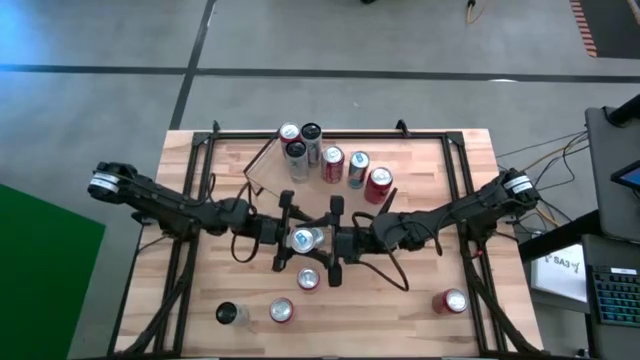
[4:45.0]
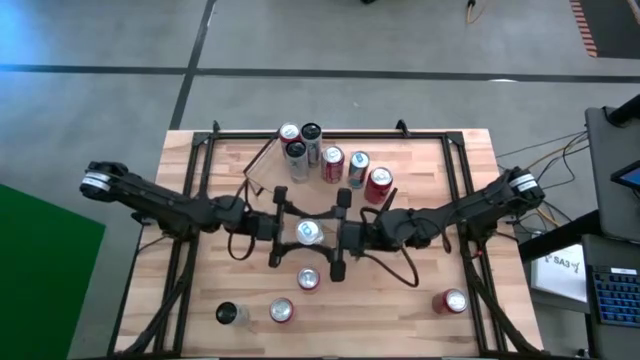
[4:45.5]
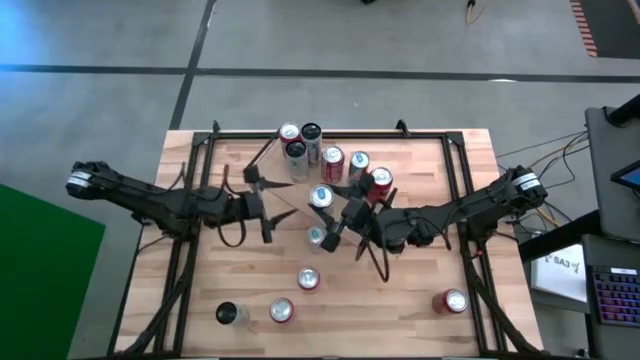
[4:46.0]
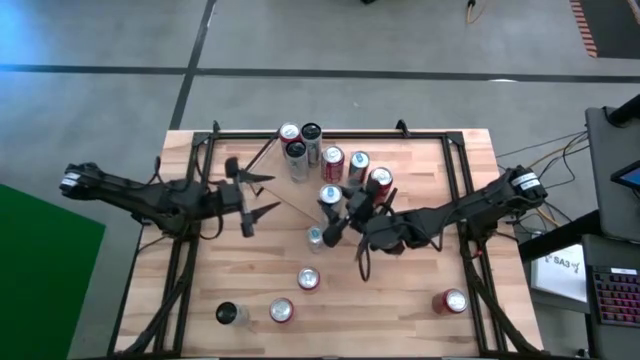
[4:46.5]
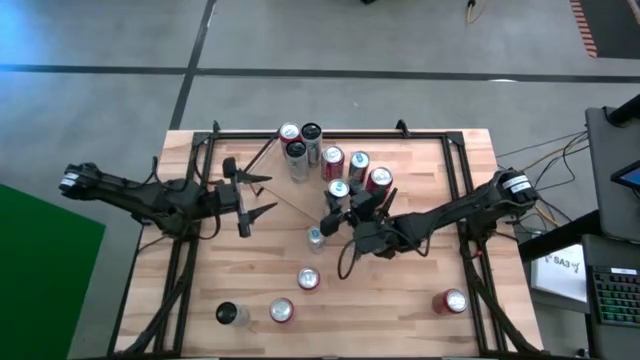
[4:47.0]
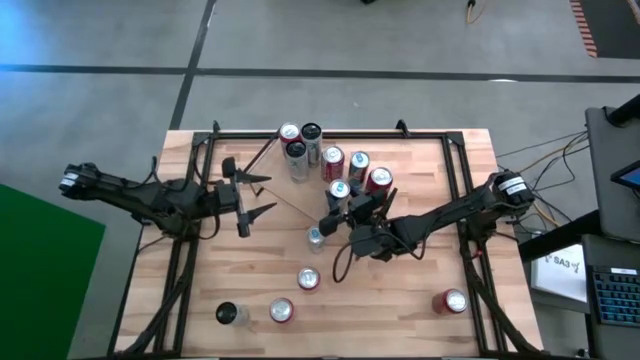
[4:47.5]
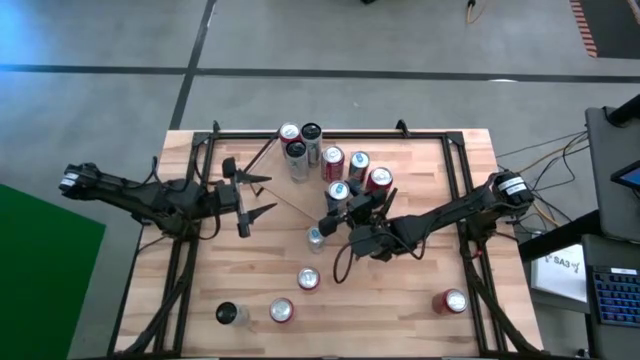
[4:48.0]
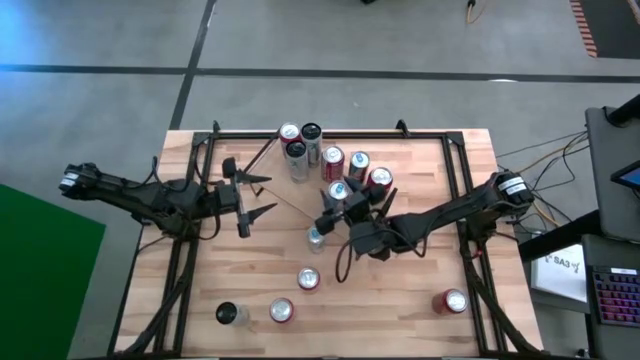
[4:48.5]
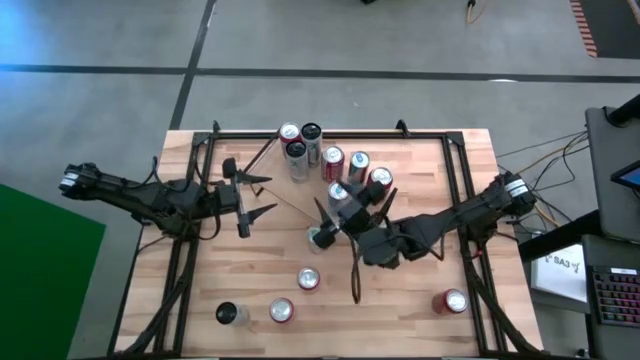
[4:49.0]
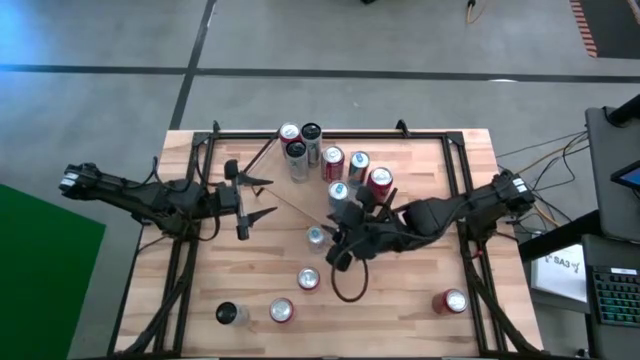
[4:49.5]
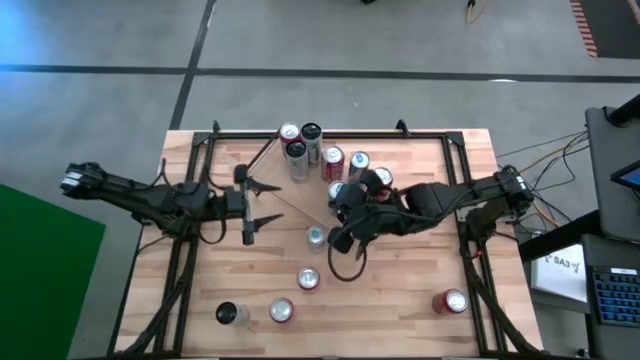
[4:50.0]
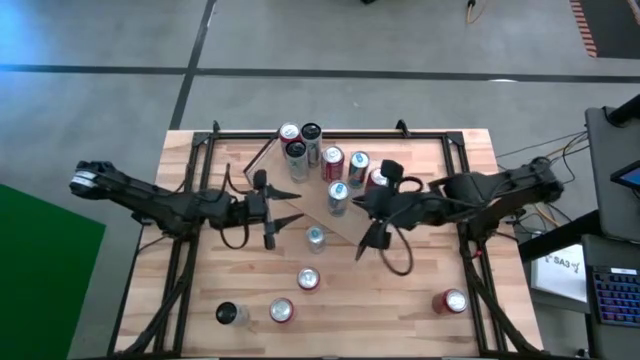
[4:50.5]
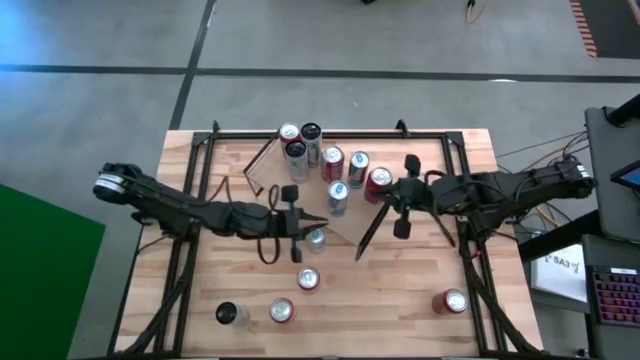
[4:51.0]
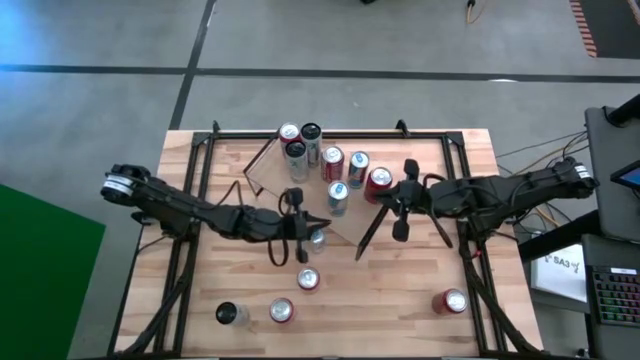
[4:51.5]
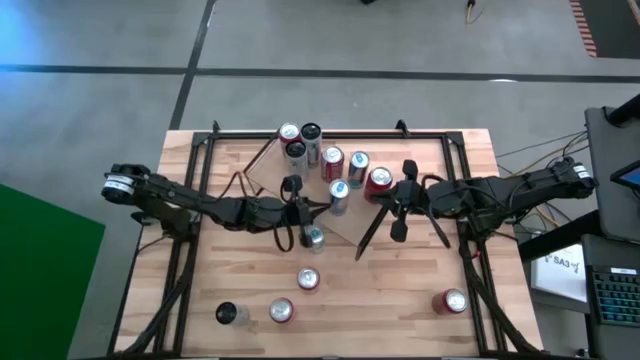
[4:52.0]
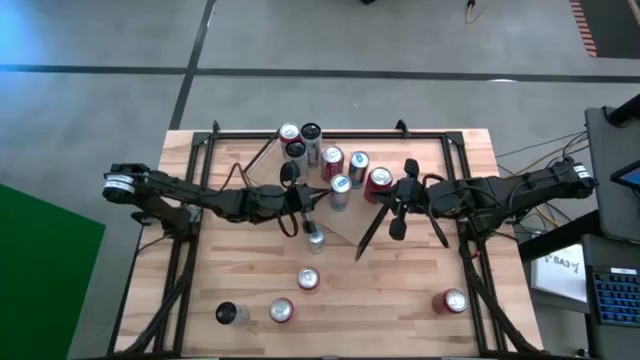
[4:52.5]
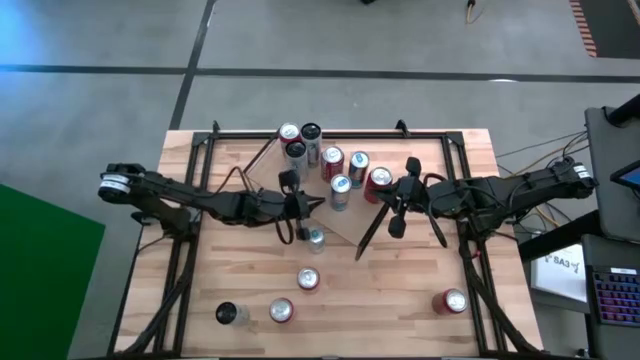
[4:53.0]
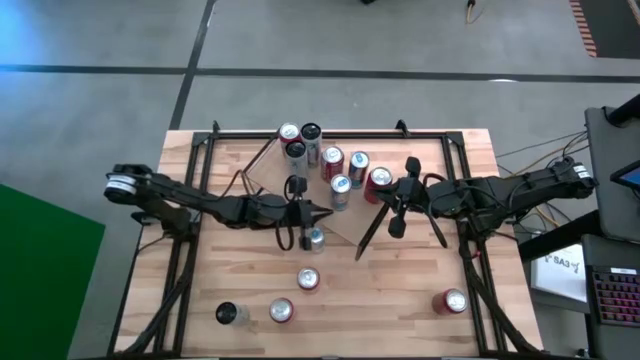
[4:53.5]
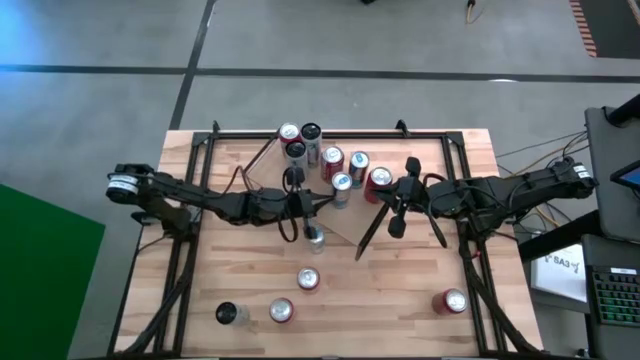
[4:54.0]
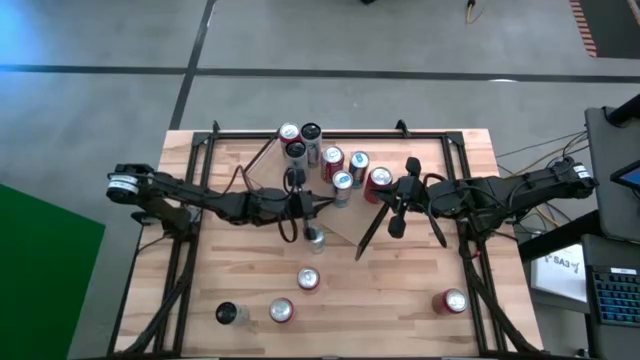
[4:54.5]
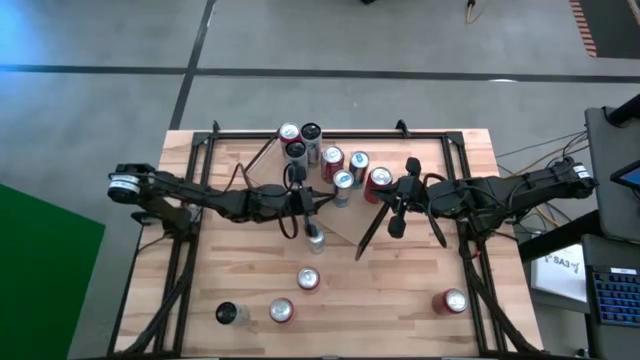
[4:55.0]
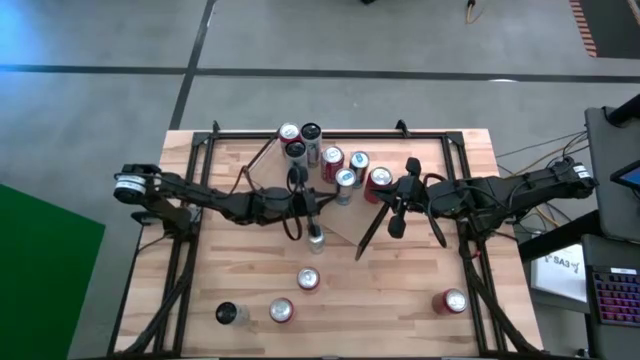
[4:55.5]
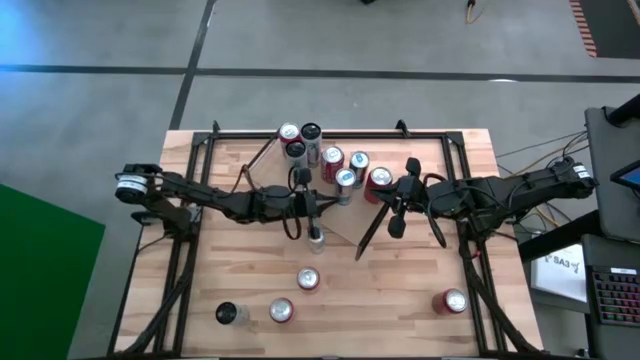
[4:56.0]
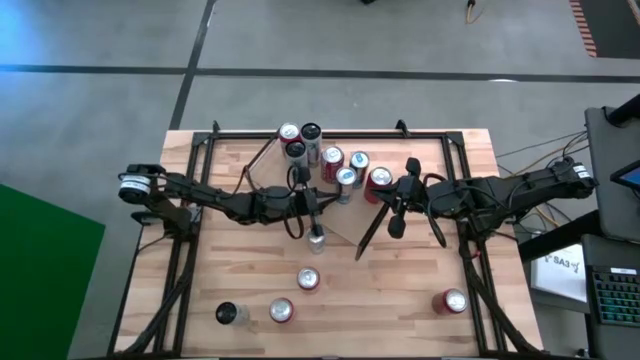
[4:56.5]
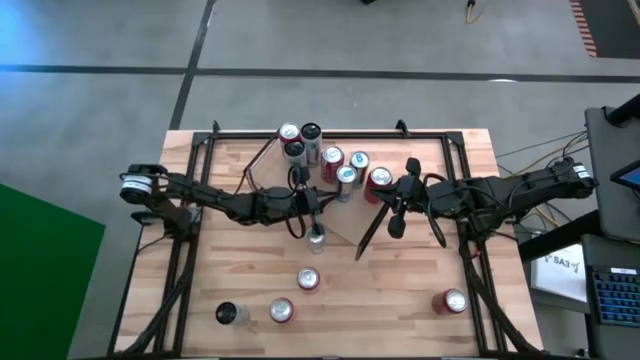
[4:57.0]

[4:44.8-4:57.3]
Task: Place canned beverage on shelf
Put the silver/blue soda can on the shelf, align with the other silver/blue soda can

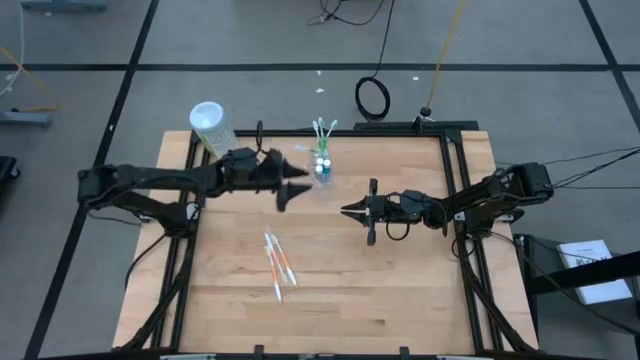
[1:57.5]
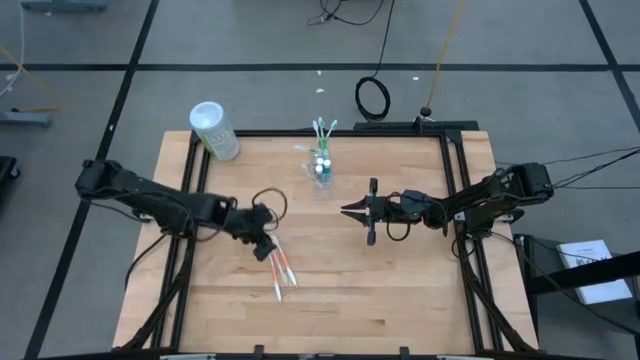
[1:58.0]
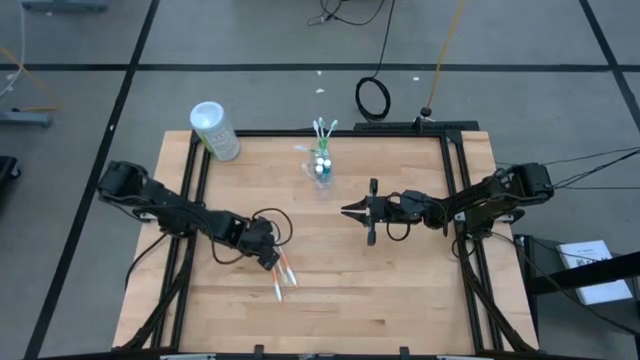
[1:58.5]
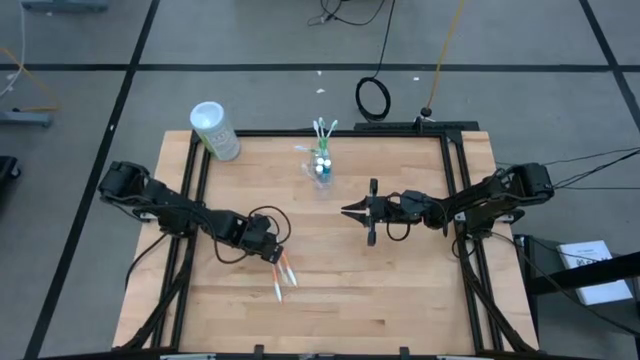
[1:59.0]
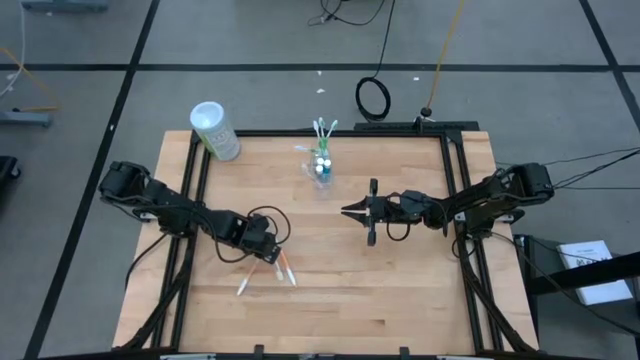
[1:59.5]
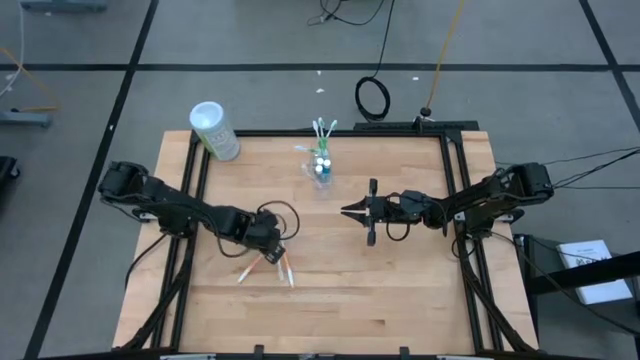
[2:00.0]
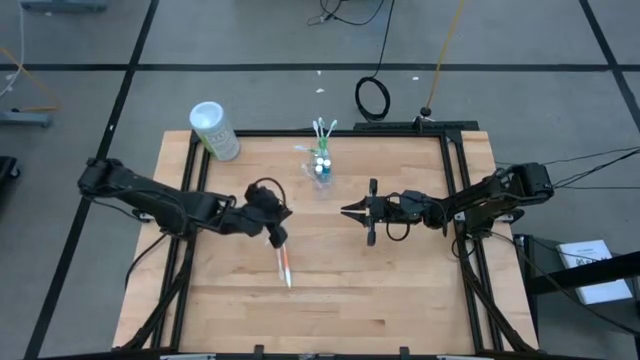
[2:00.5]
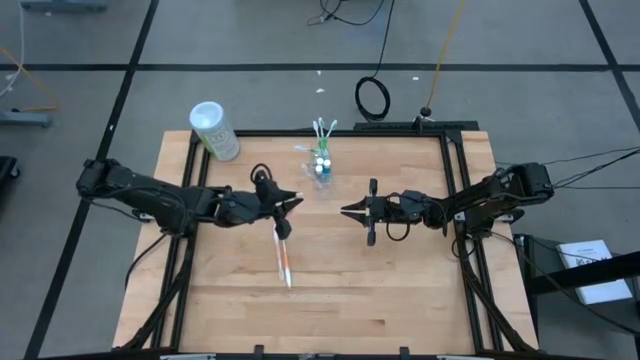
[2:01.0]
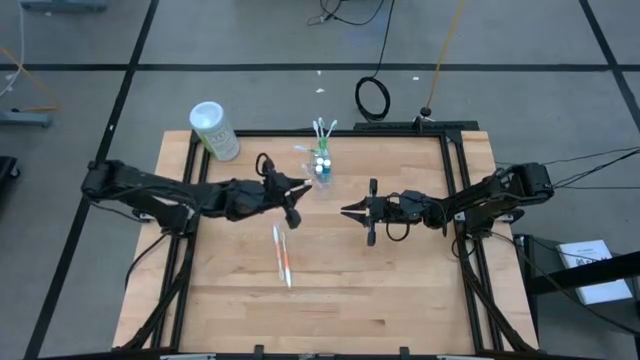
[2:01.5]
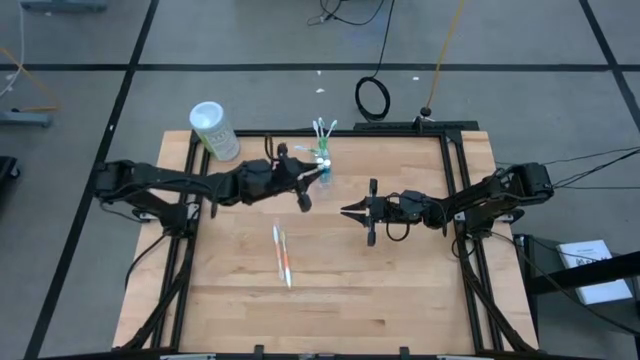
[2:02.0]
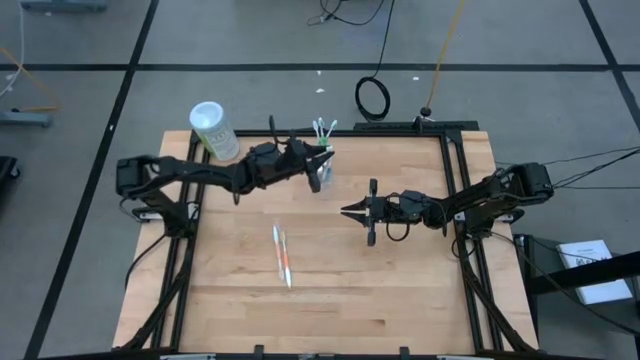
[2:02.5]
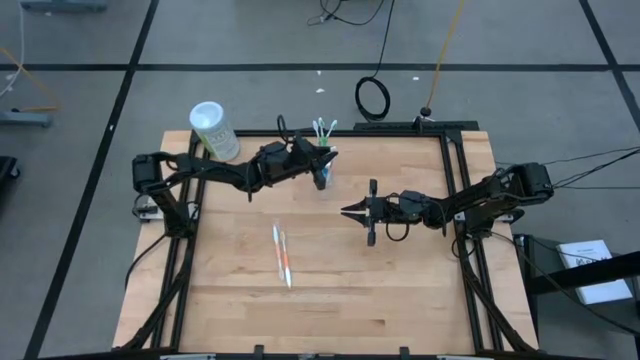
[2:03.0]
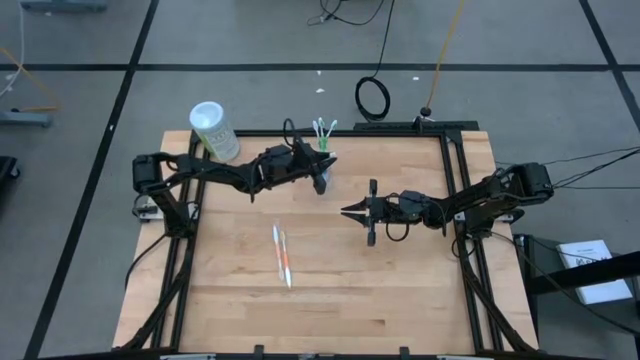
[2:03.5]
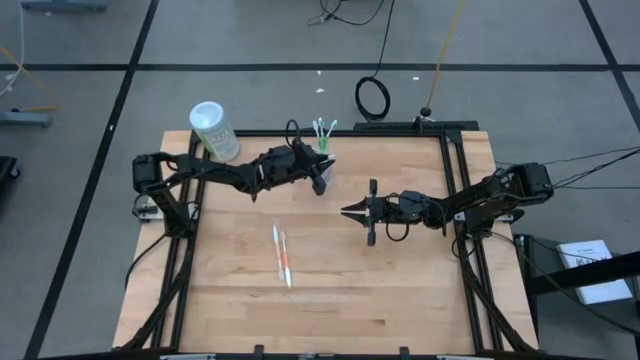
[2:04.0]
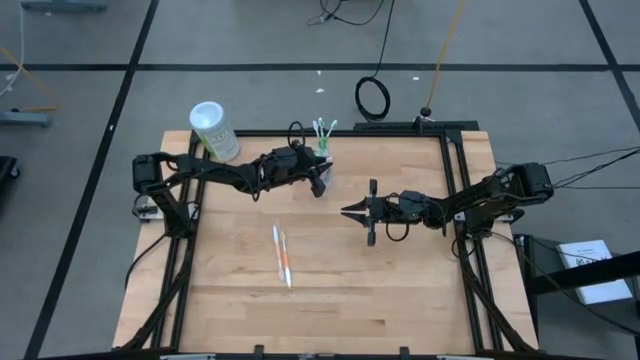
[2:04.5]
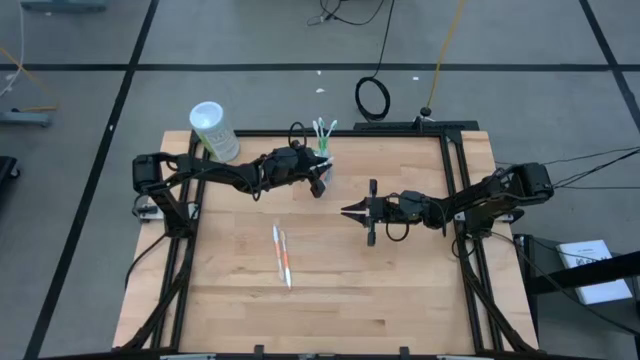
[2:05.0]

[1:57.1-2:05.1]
Task: Pick & Place toothbrushing station
Put the orange toothbrush into the transparent organizer

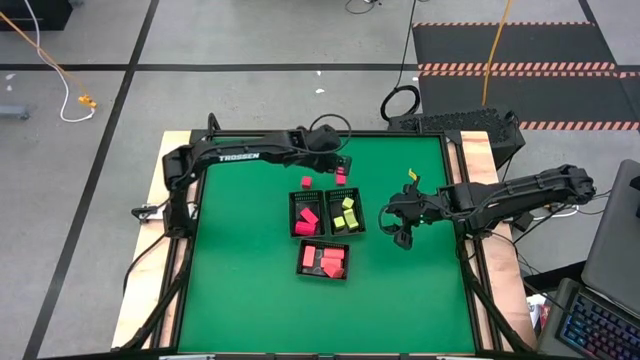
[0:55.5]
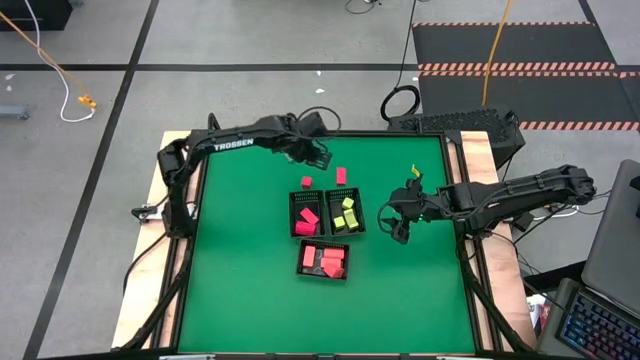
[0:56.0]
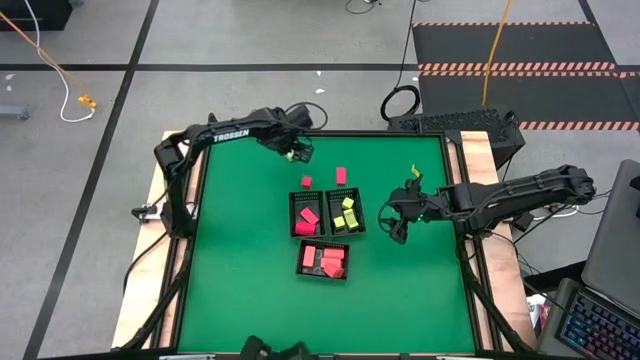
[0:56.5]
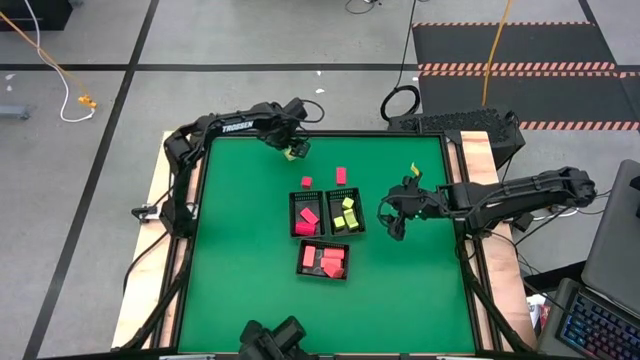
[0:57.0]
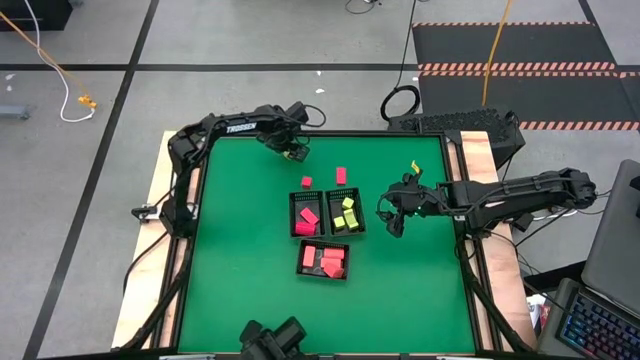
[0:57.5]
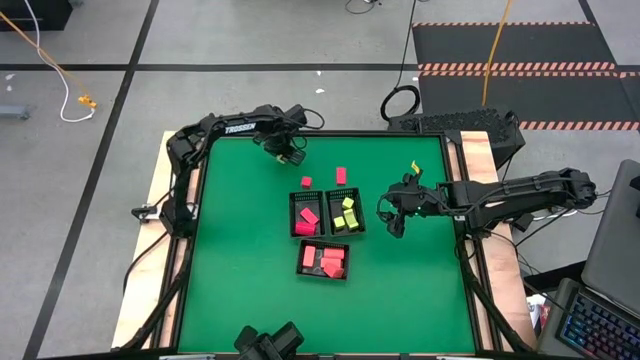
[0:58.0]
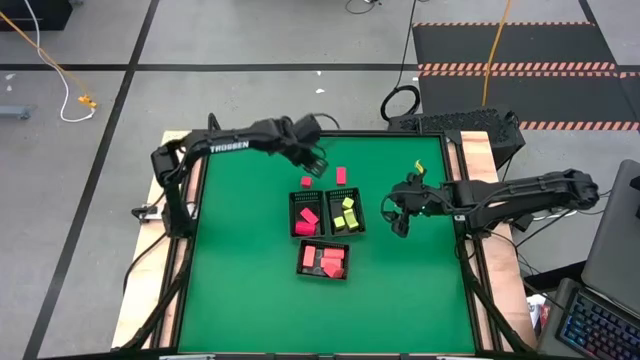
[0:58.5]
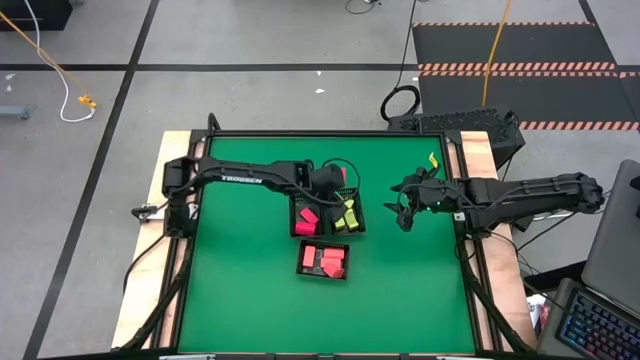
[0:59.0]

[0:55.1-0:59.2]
Task: Sort & place blocks by color
Put the green block into the right black bin
